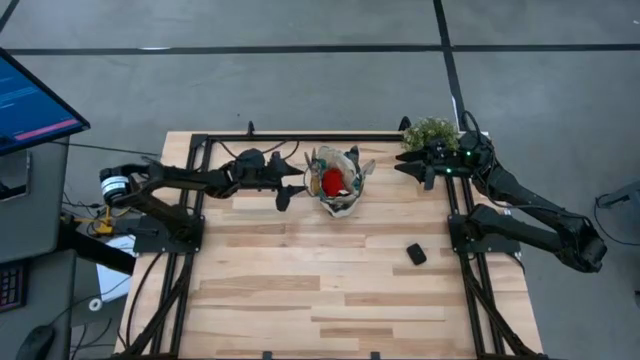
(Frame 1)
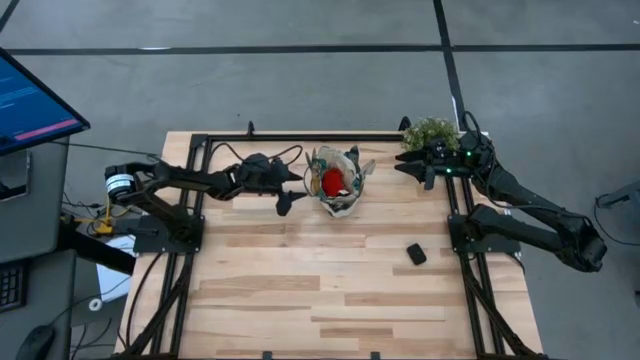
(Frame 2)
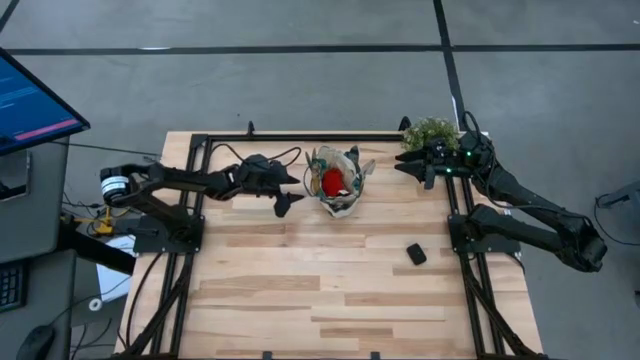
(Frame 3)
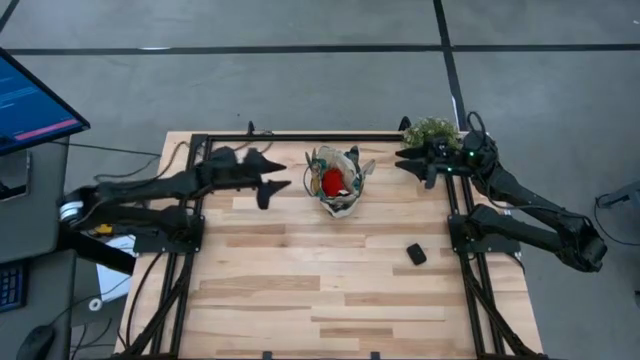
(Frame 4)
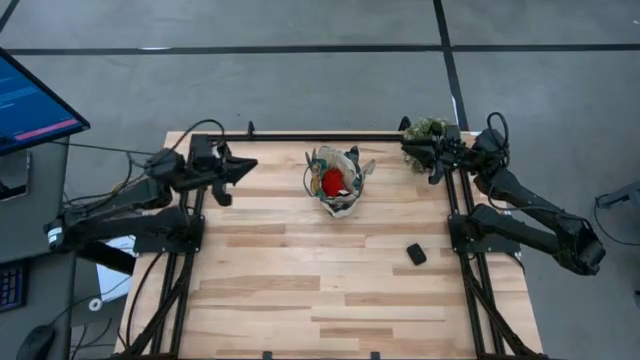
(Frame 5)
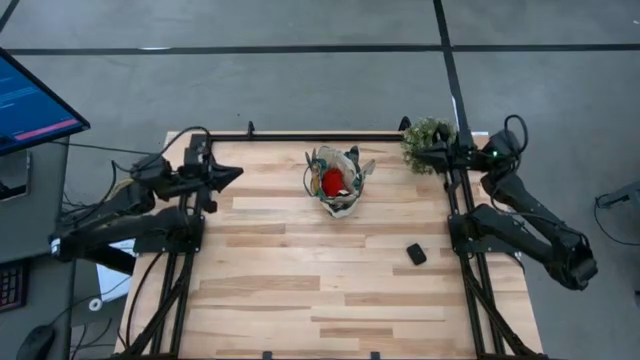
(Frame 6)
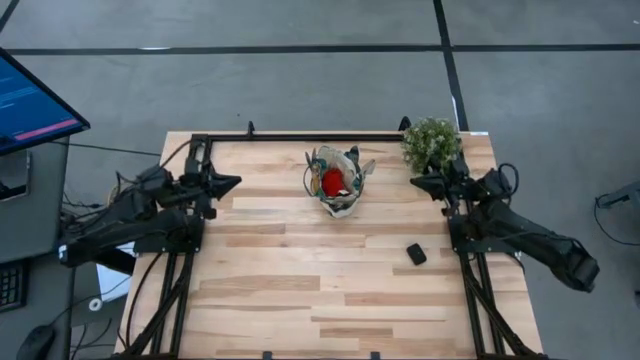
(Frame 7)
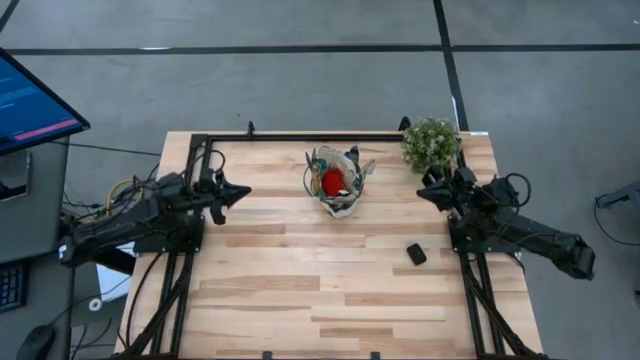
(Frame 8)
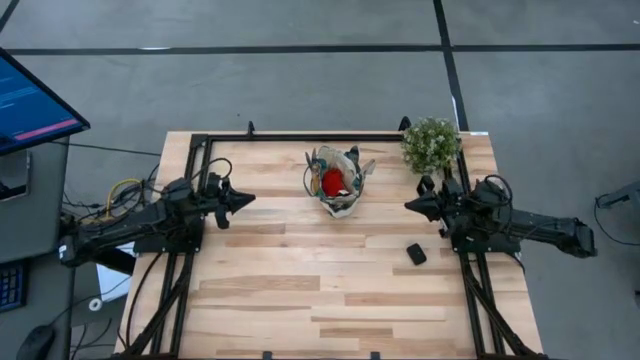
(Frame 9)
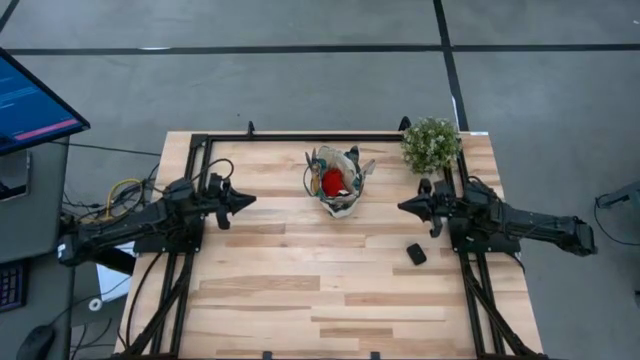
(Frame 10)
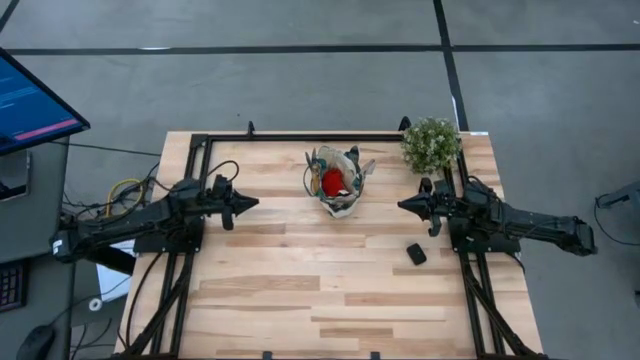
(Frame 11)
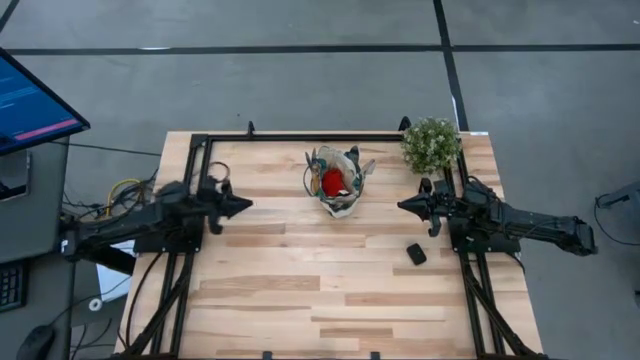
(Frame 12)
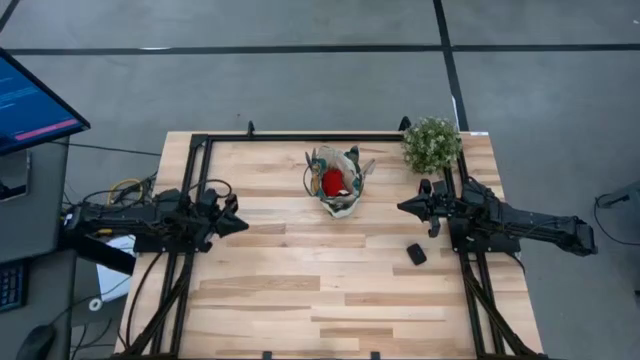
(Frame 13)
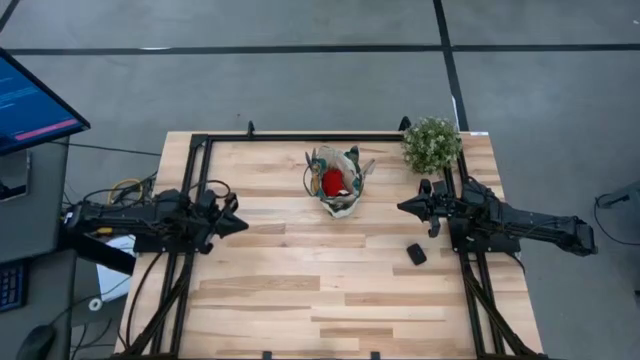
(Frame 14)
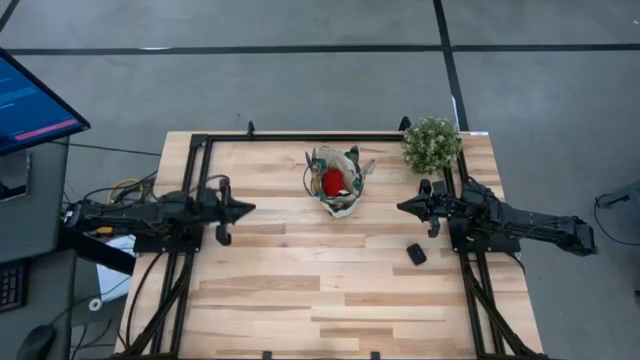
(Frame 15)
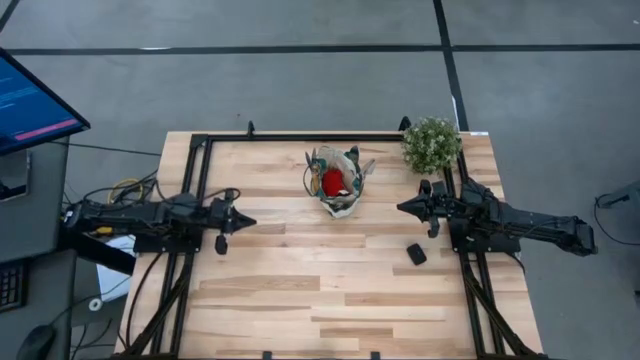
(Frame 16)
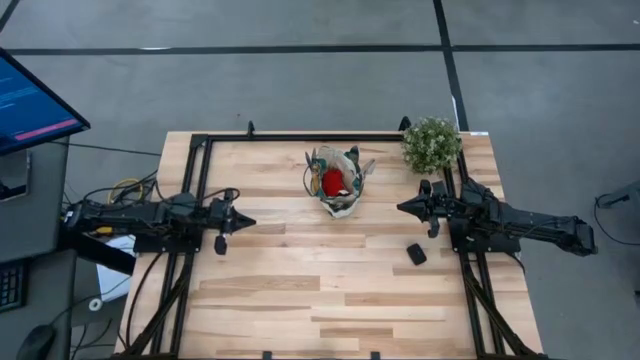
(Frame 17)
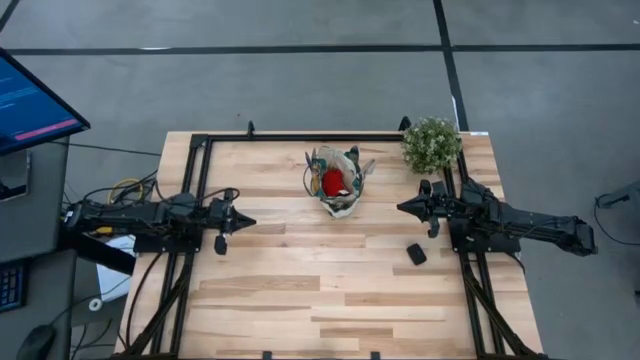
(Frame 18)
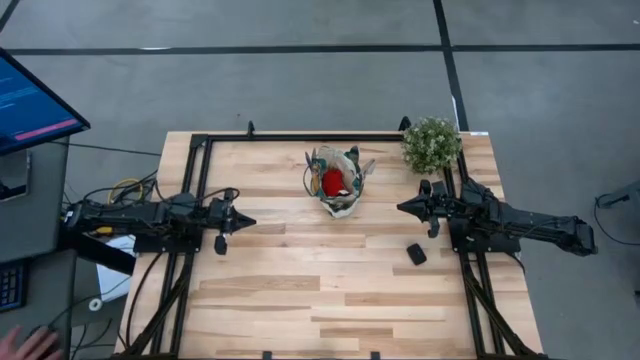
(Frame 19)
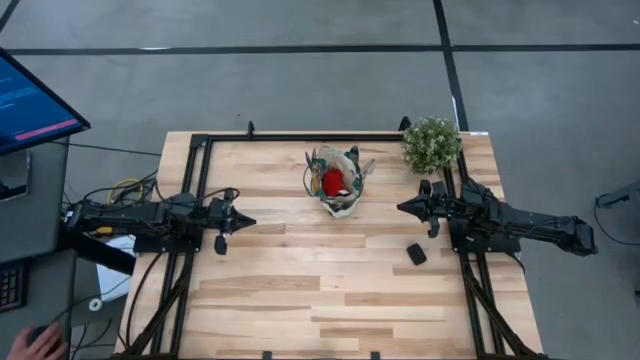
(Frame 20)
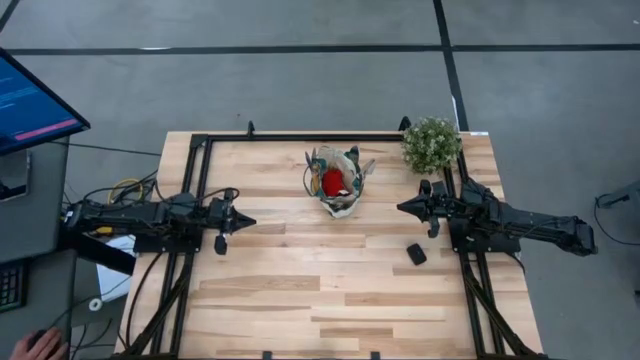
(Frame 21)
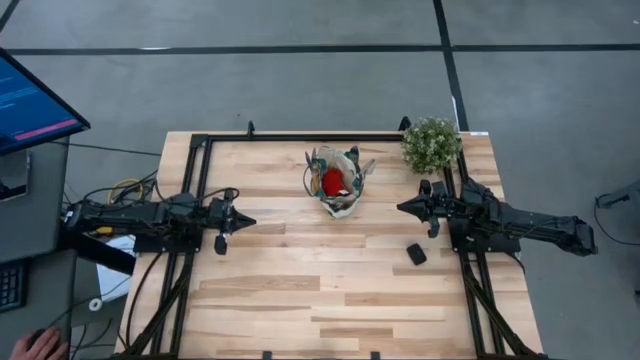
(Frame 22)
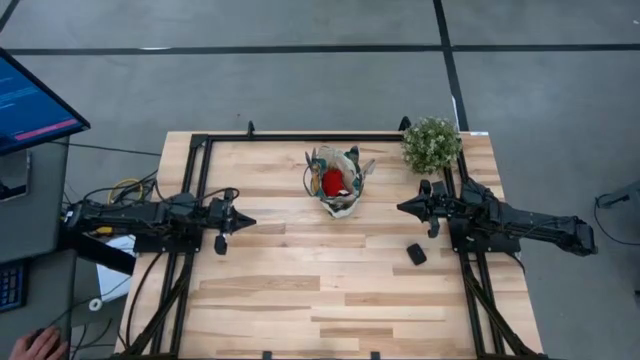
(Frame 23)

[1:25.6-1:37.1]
Task: Pick & Place Garden tools in Gardening bag
Return to Home Position

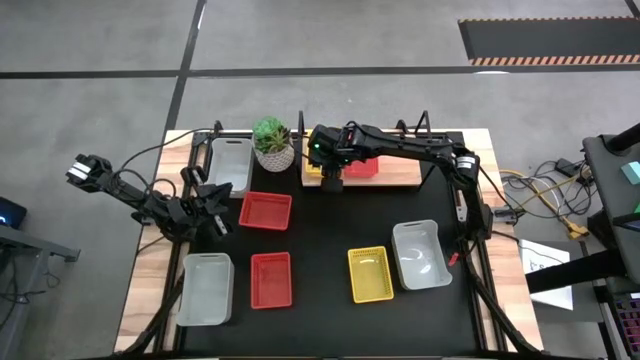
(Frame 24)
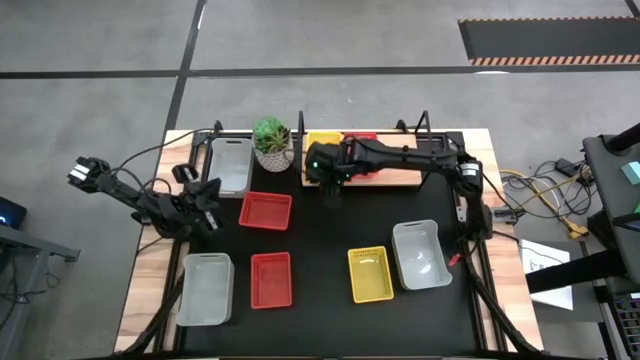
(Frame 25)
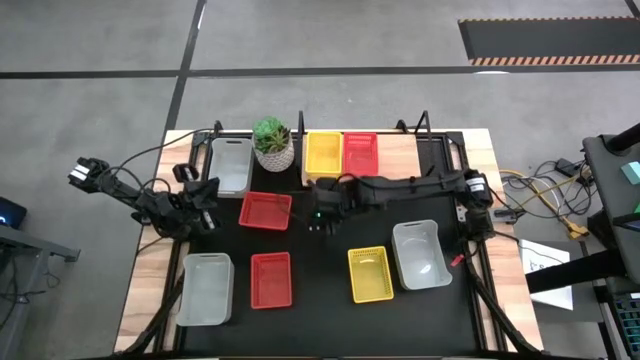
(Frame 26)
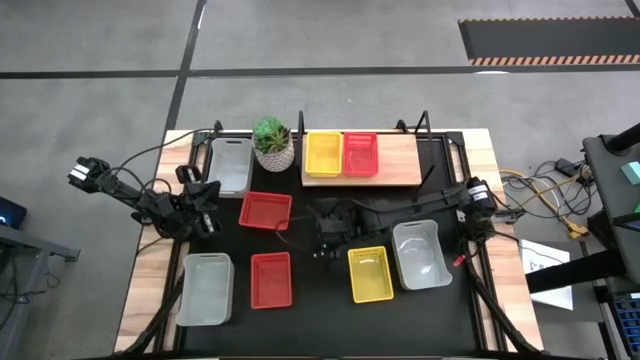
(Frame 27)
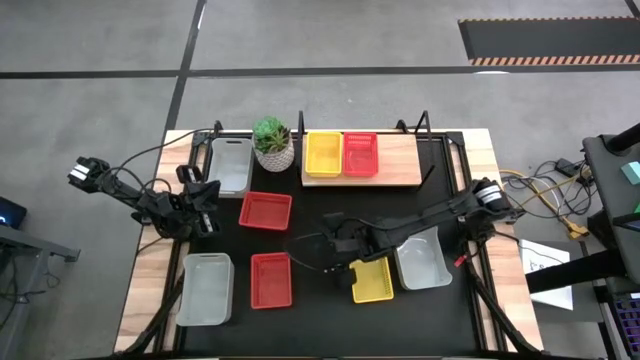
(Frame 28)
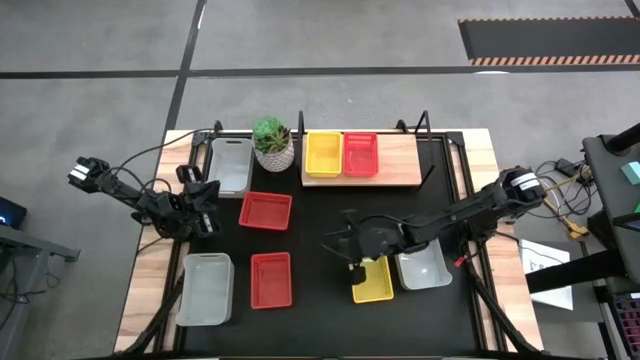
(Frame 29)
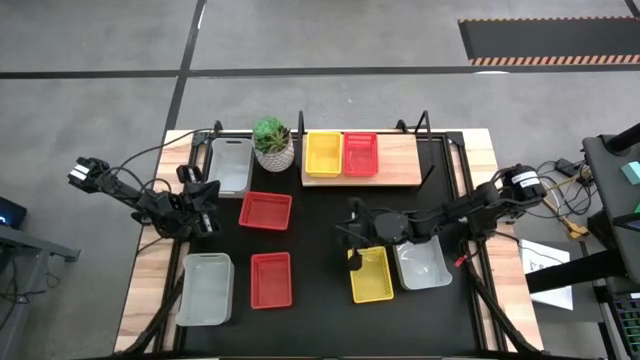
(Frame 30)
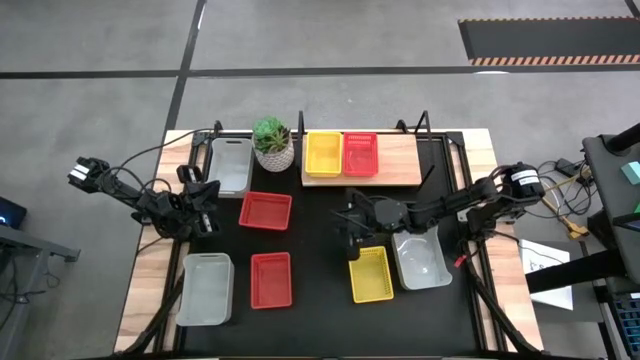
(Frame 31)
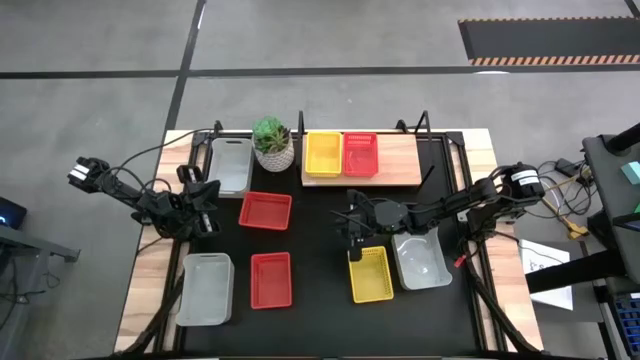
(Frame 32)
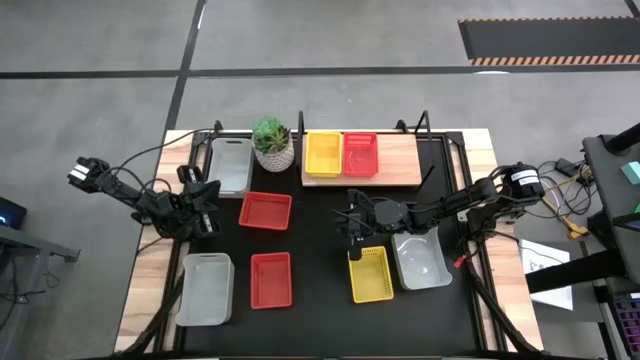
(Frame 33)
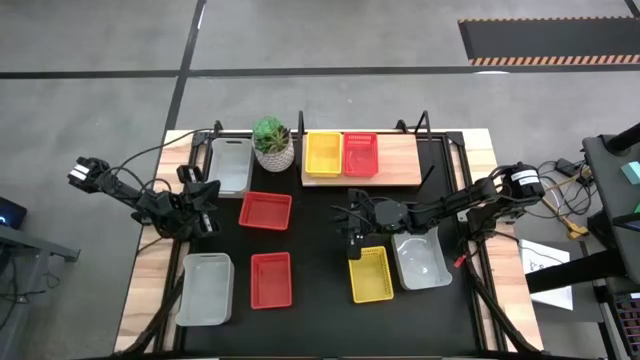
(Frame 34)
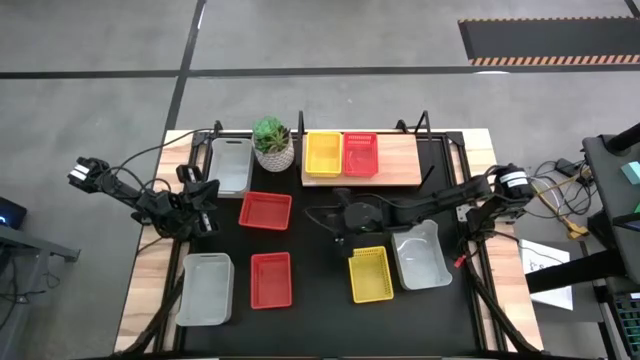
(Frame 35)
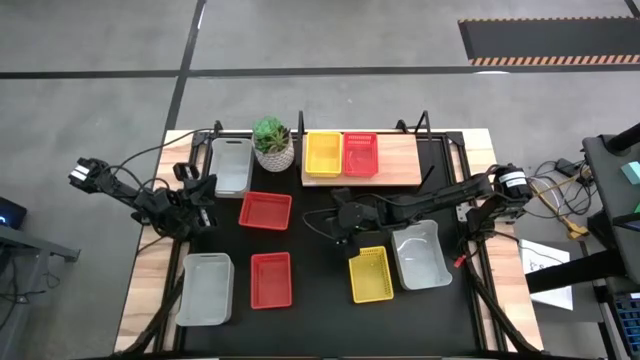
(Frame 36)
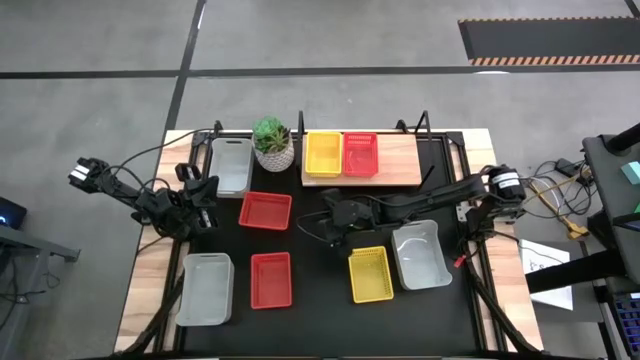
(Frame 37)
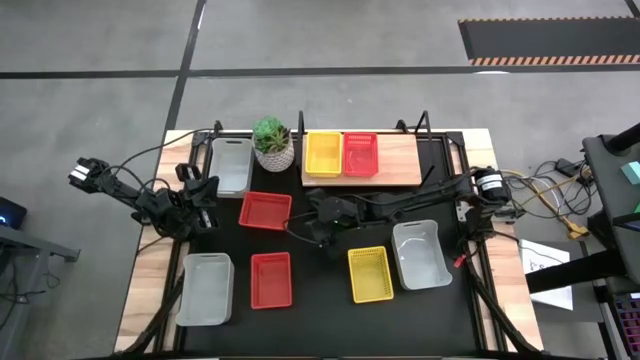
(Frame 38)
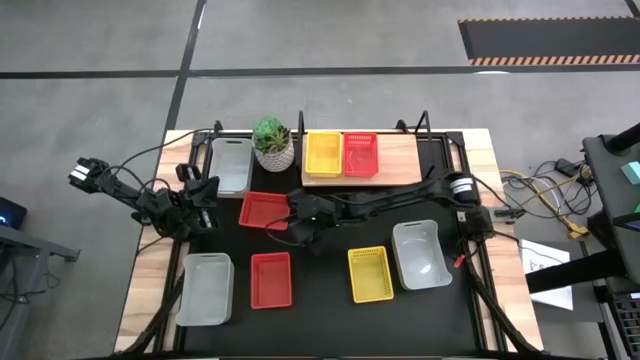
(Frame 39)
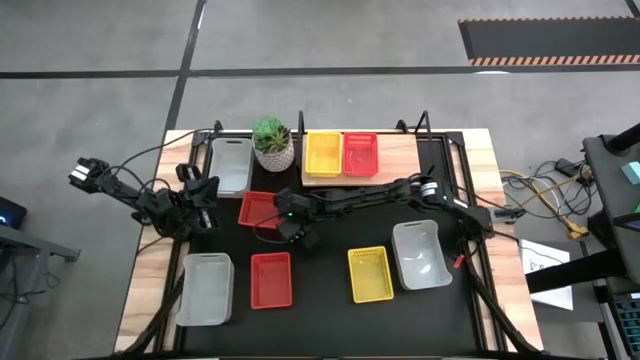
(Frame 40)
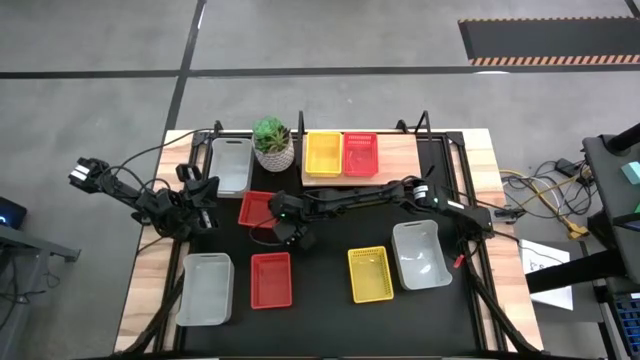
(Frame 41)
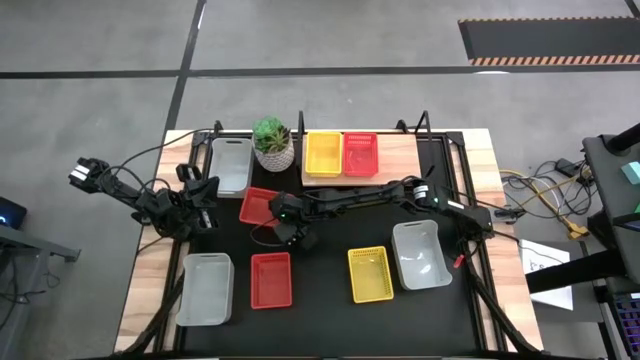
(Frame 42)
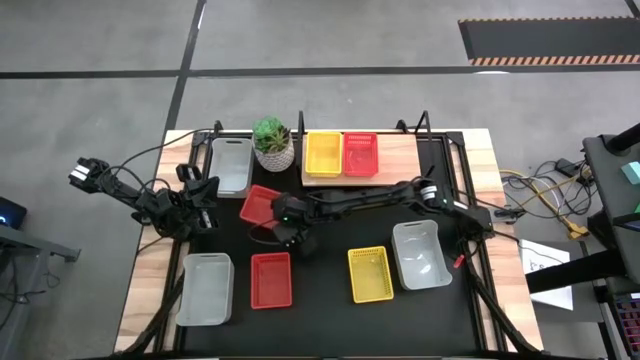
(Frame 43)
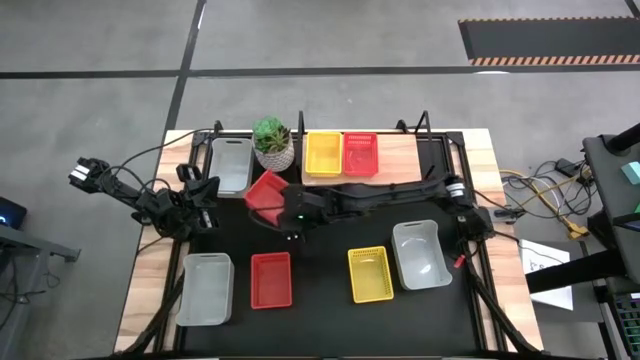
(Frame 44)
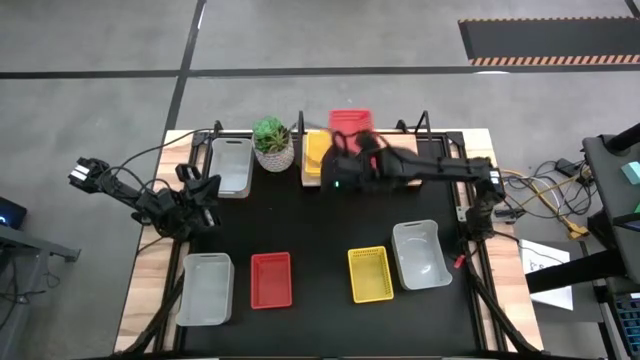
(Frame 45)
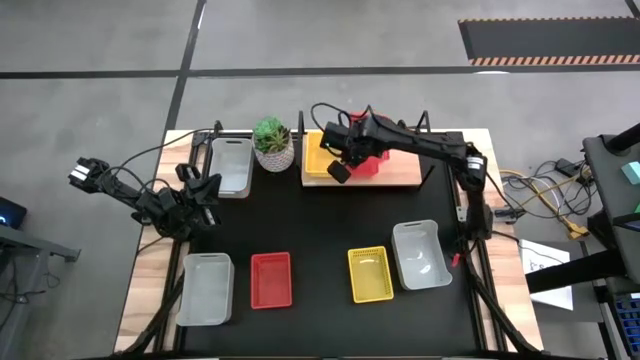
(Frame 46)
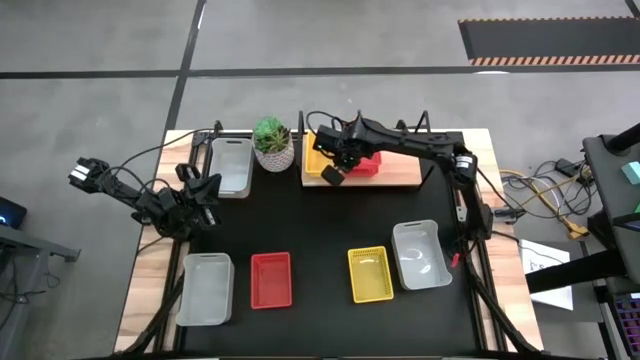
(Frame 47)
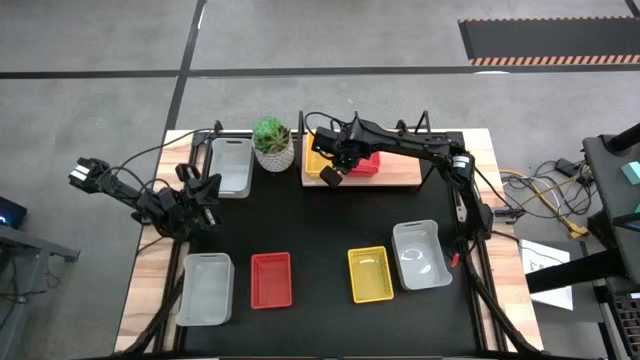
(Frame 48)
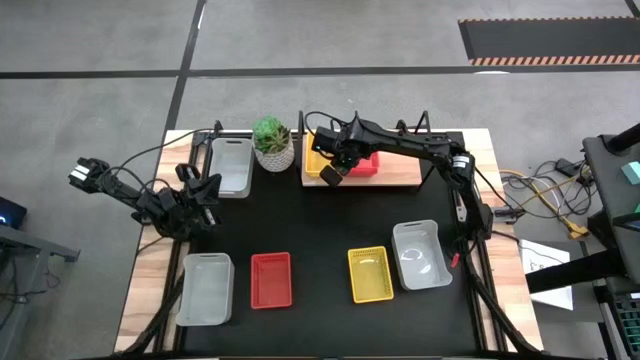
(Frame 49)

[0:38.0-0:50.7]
Task: Stack baskets on shelf by color
Stack the top red bin on top of the red bin on the shelf
